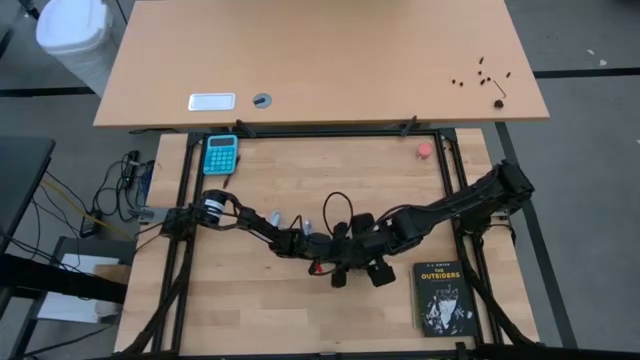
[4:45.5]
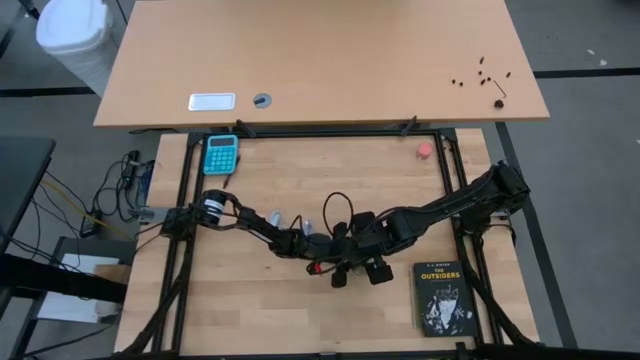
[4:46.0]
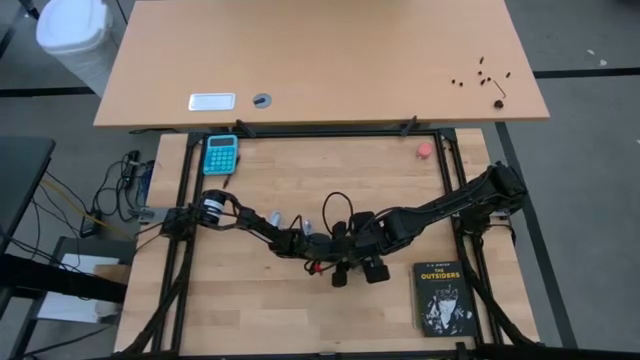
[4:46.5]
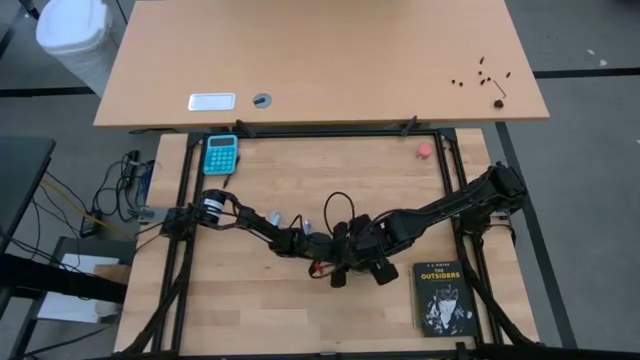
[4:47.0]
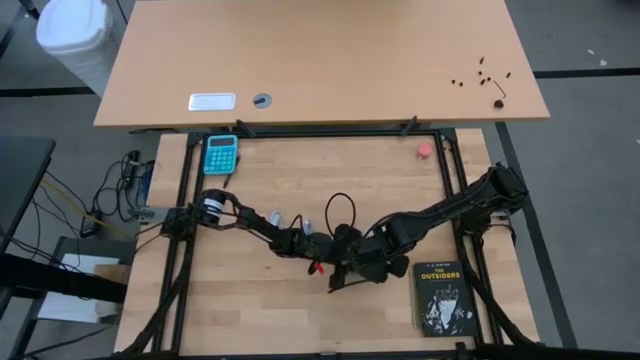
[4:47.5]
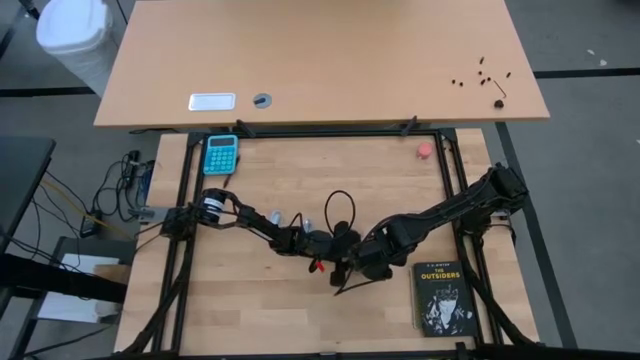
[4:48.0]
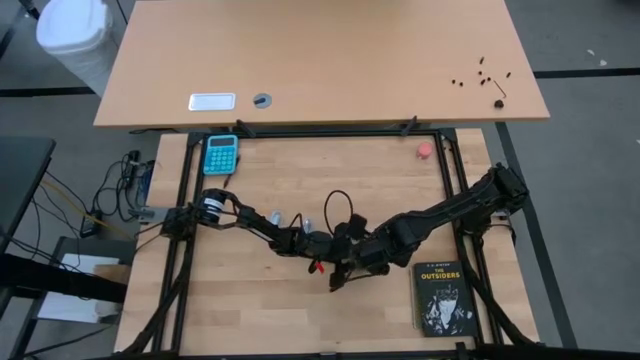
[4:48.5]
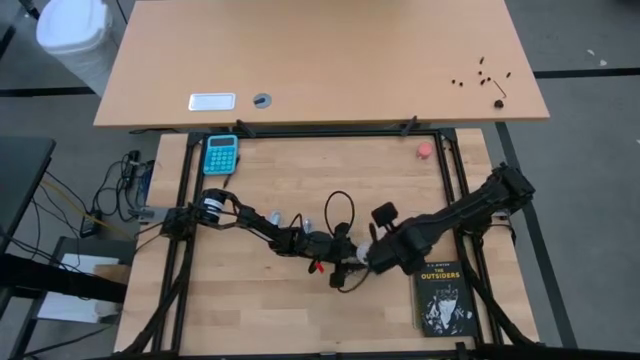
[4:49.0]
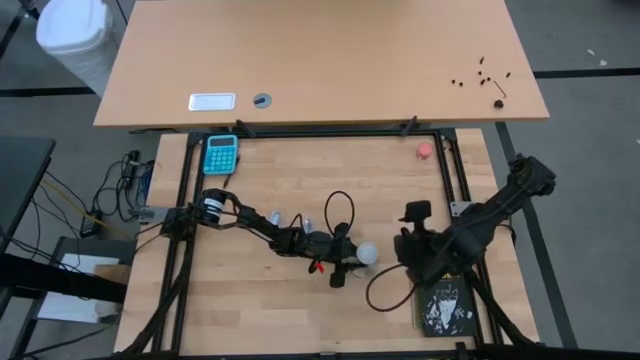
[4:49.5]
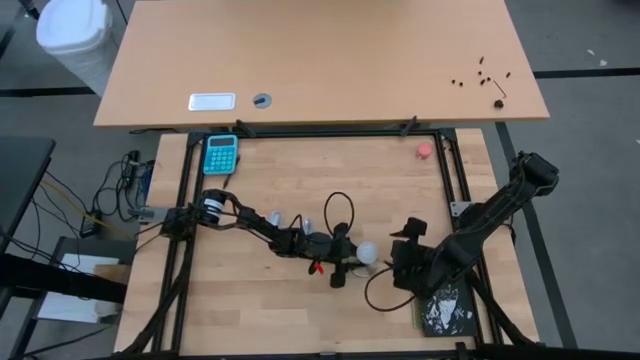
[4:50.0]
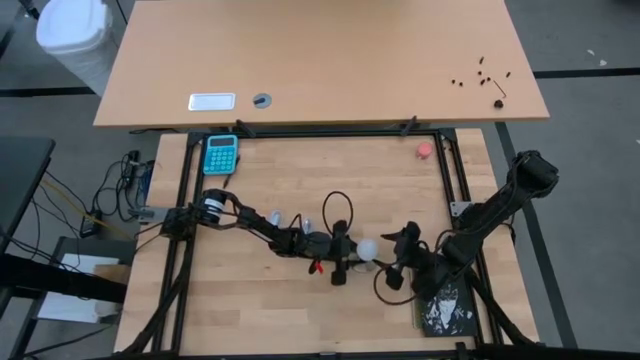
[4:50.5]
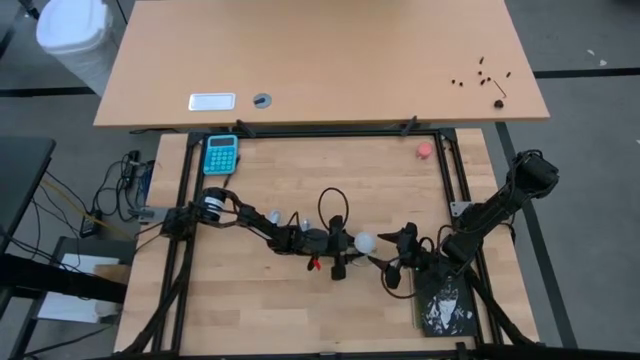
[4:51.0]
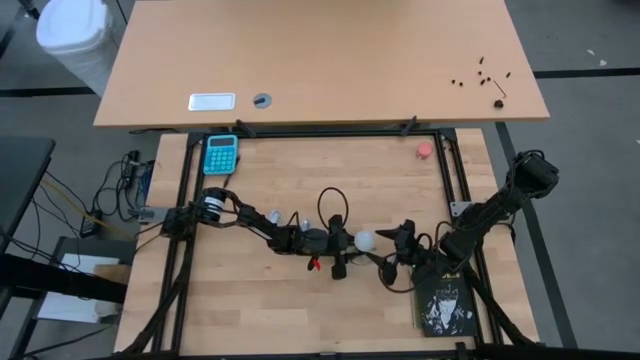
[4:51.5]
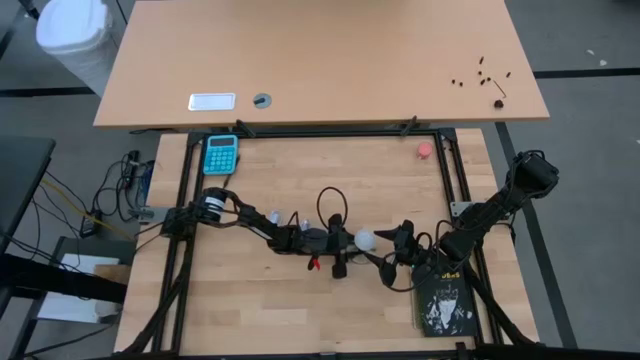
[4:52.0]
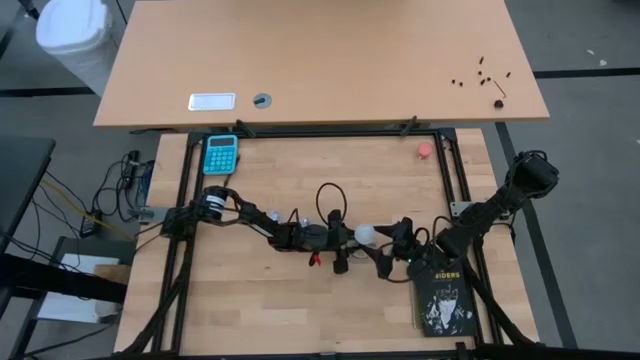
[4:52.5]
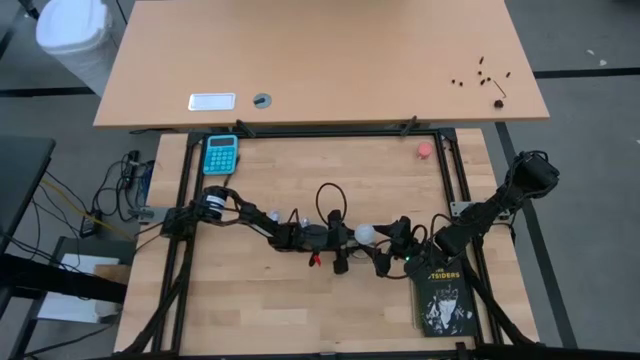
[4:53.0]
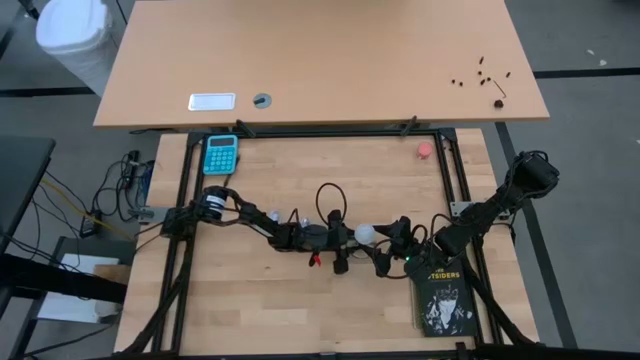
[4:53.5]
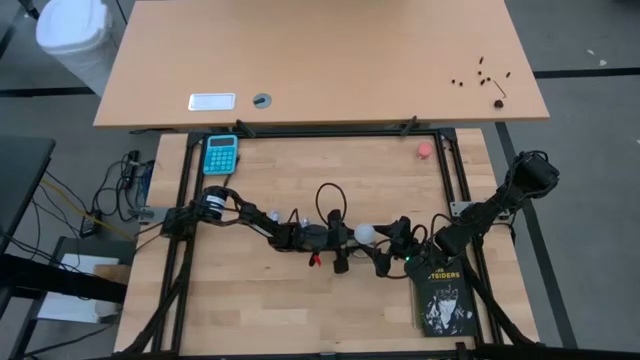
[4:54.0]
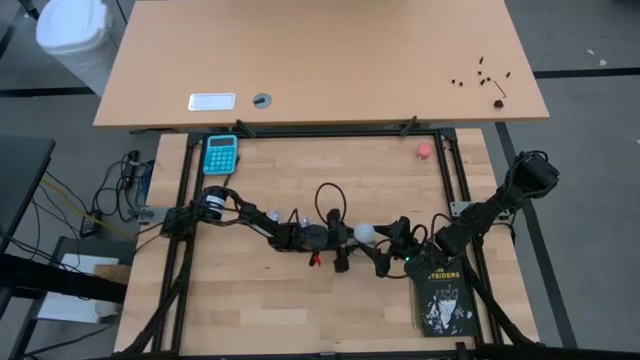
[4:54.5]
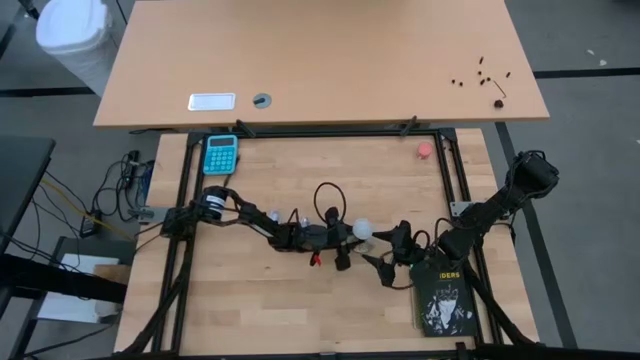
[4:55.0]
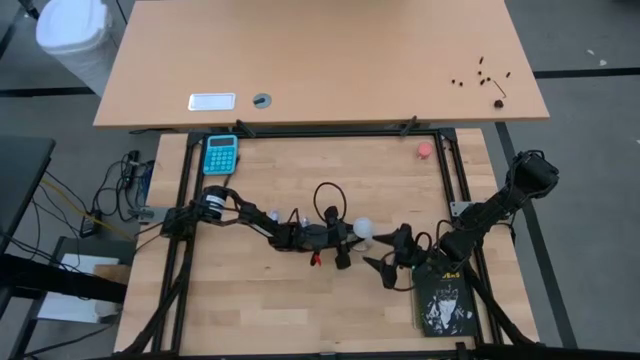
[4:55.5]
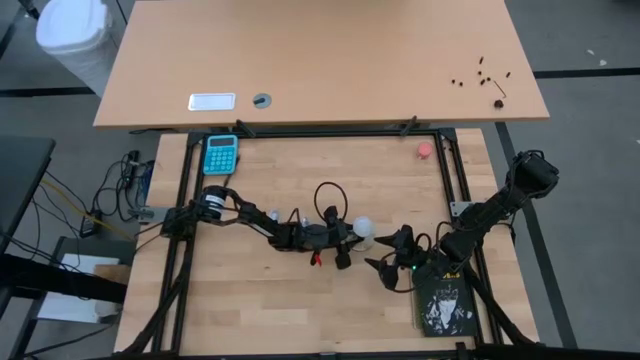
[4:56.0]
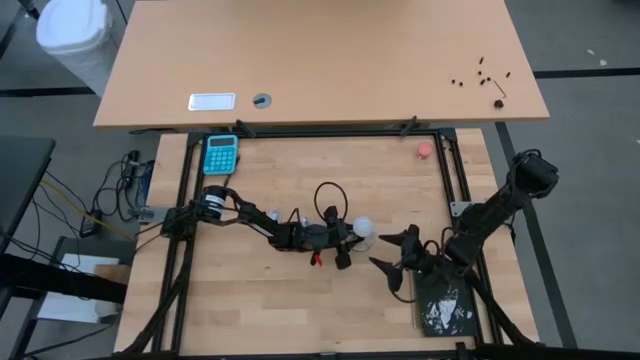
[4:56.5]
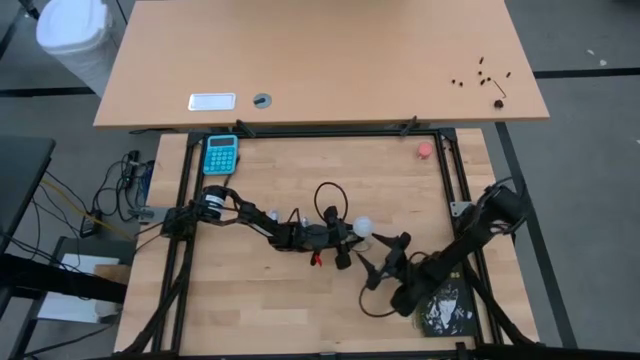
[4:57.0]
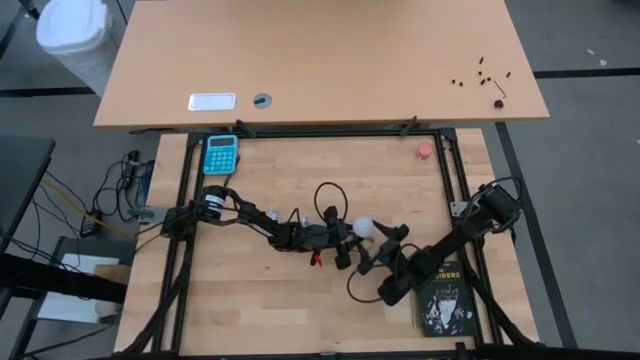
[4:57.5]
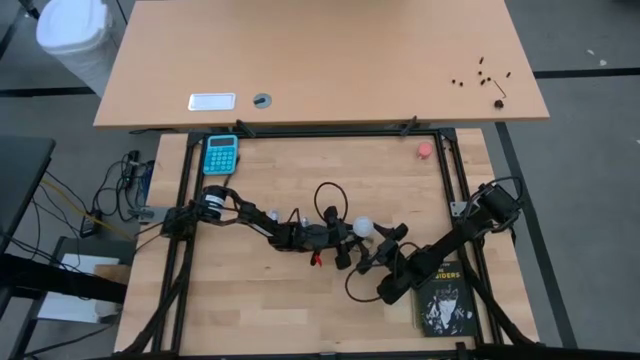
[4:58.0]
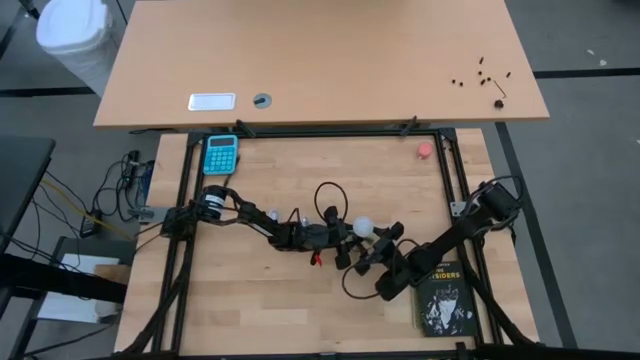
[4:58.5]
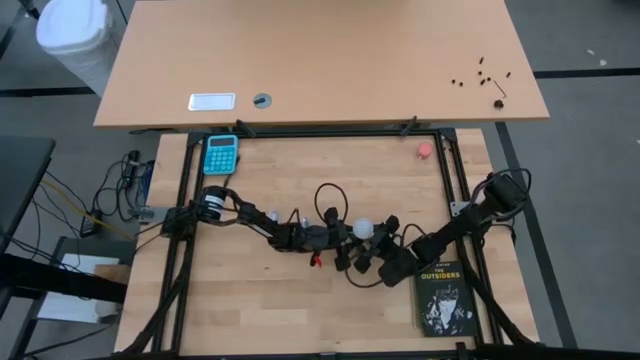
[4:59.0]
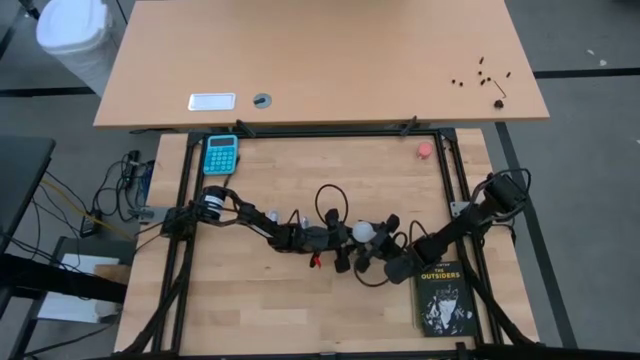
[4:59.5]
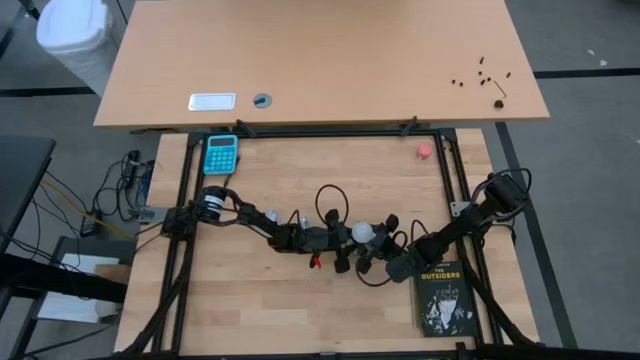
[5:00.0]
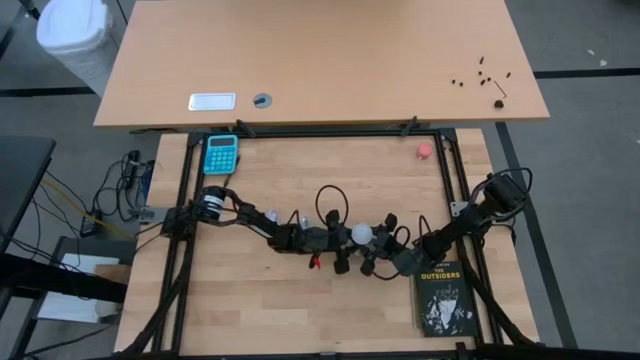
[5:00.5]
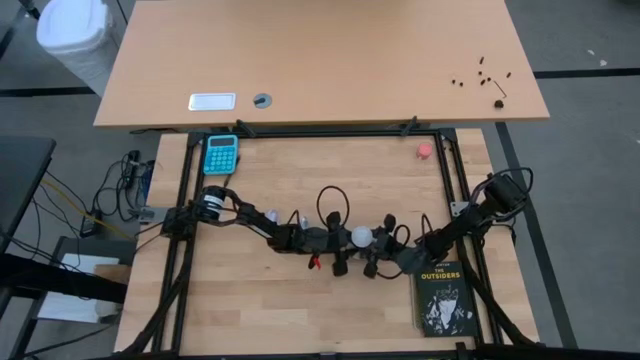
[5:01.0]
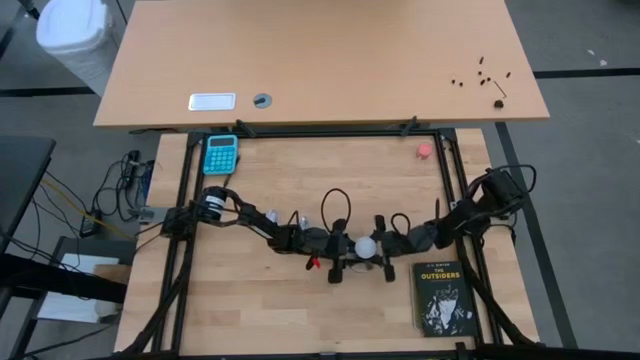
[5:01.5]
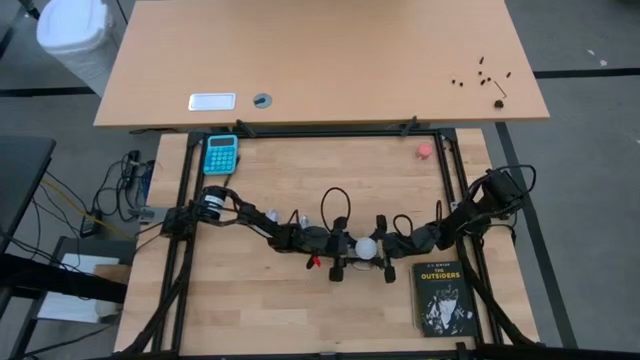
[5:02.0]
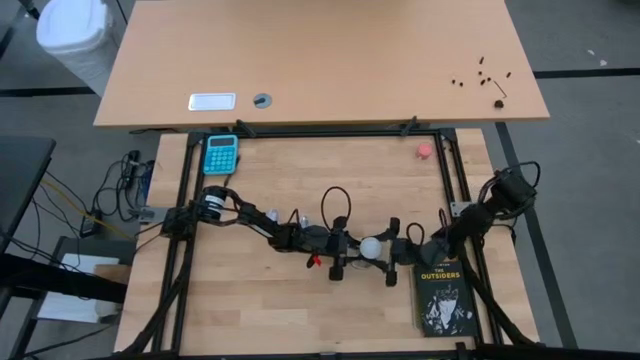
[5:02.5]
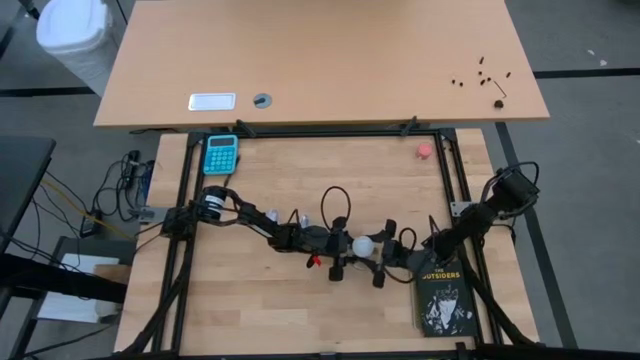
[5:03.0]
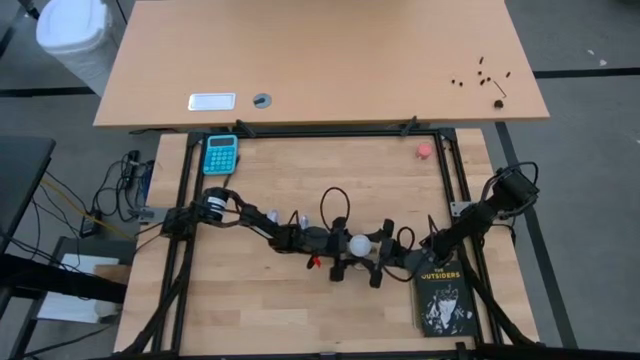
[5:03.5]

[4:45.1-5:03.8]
Task: Screw lightbulb
Remove the lightbulb from the lamp

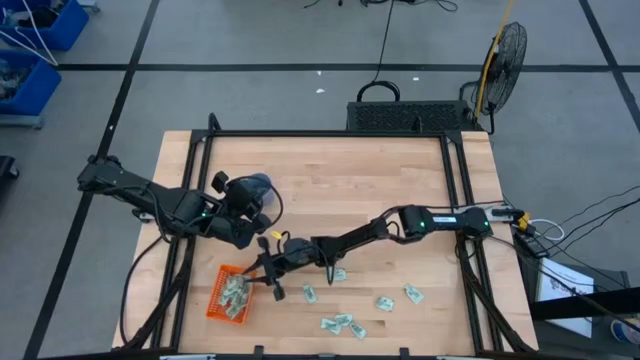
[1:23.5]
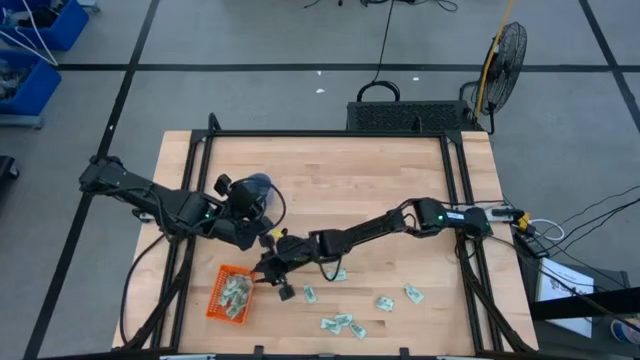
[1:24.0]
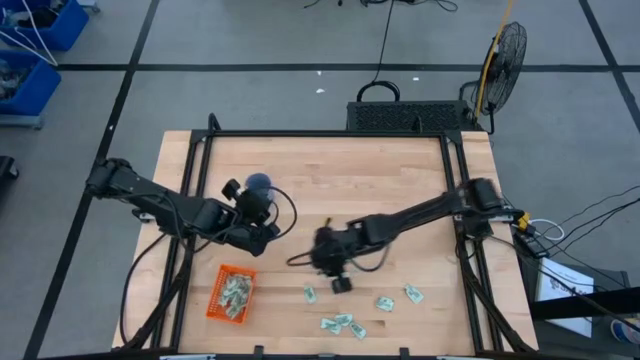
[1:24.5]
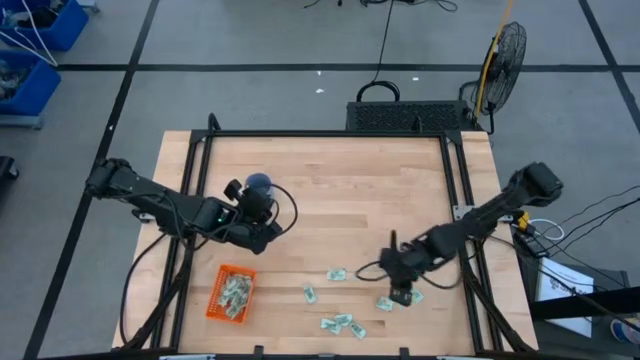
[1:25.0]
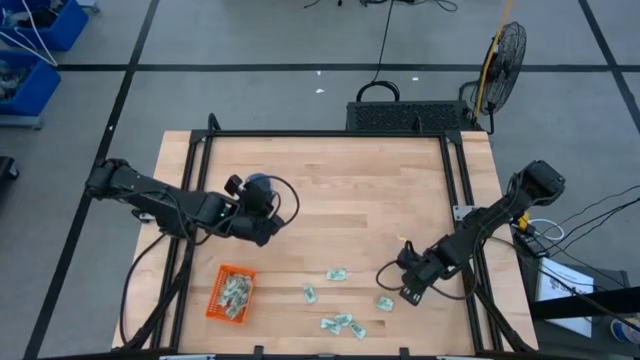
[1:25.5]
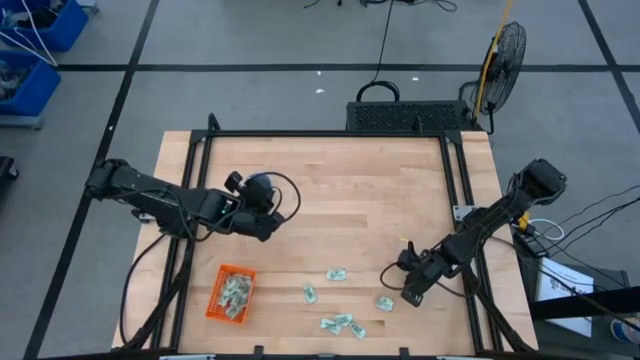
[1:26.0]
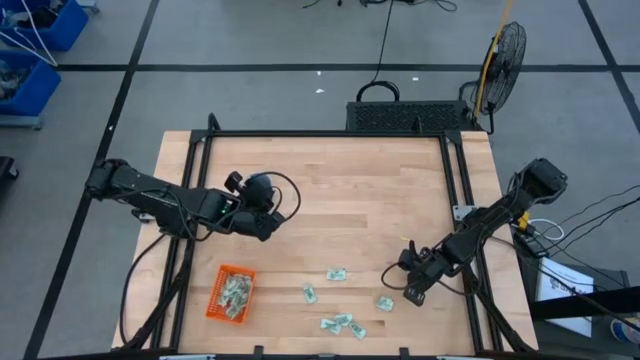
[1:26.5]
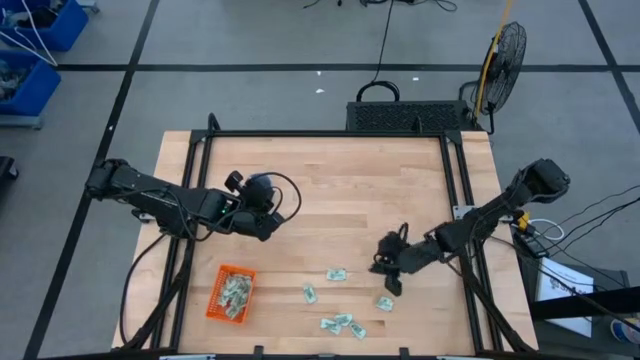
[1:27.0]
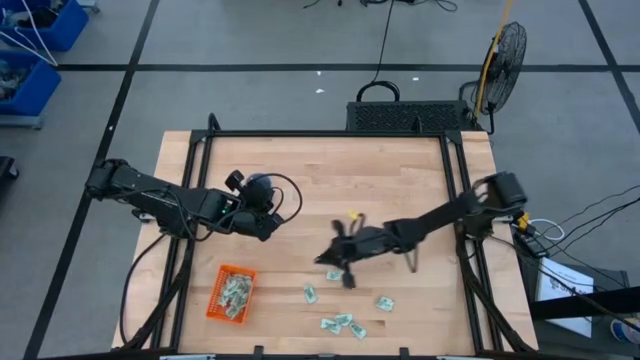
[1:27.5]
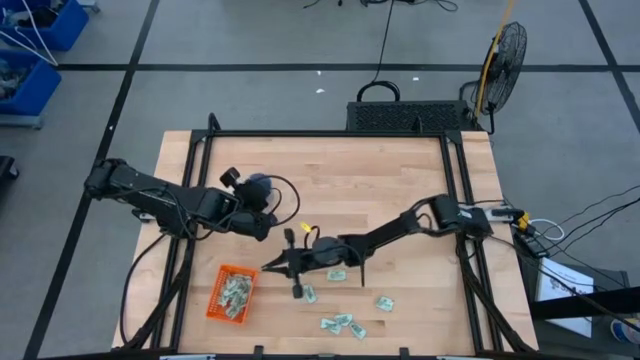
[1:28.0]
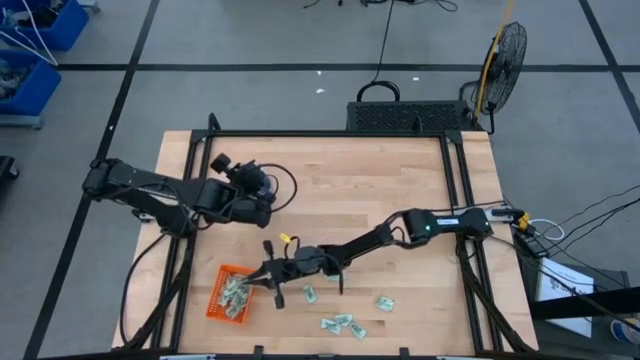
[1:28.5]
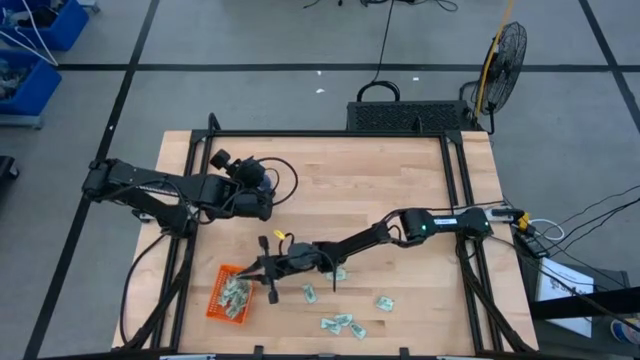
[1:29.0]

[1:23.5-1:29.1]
Task: Pick and place Stevia / Truvia into bins
Put the stevia packet into the orange bin
